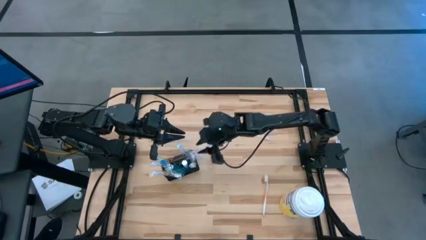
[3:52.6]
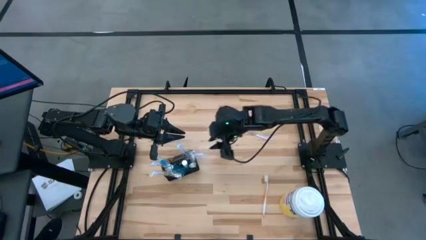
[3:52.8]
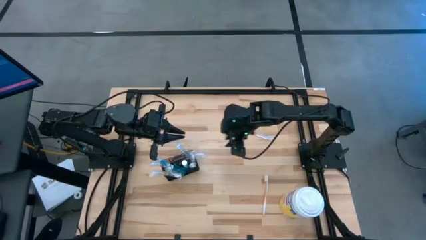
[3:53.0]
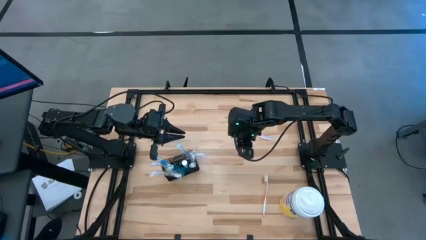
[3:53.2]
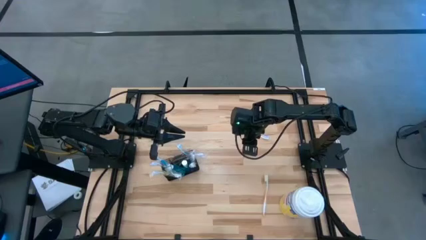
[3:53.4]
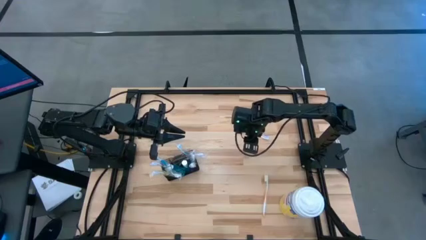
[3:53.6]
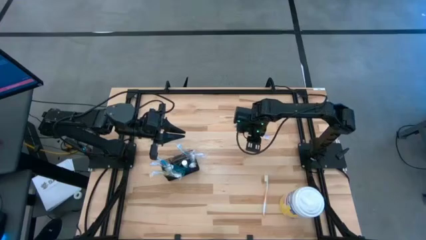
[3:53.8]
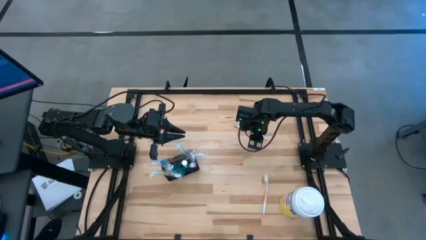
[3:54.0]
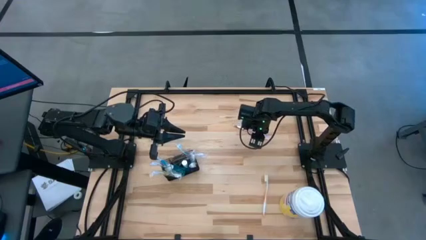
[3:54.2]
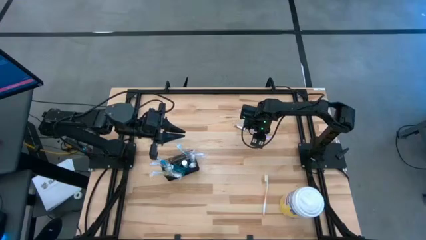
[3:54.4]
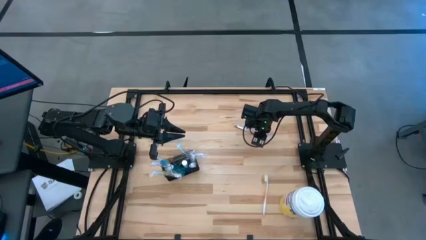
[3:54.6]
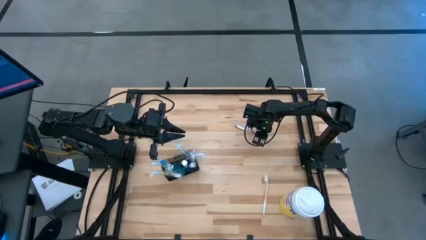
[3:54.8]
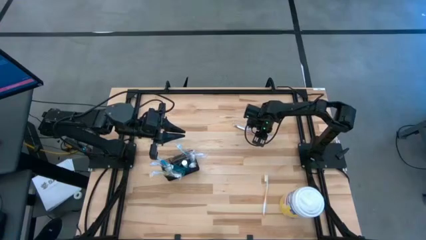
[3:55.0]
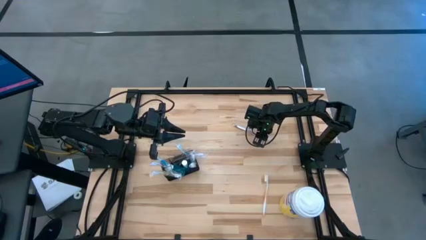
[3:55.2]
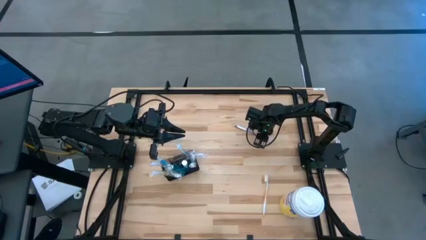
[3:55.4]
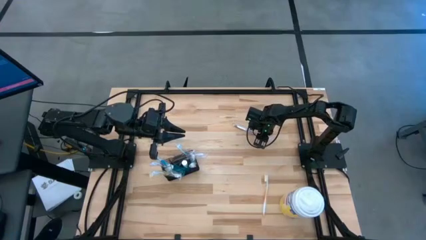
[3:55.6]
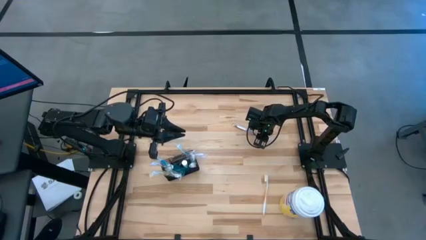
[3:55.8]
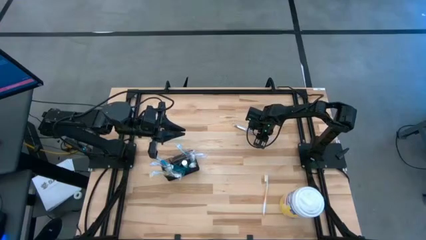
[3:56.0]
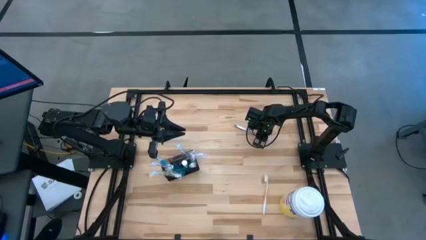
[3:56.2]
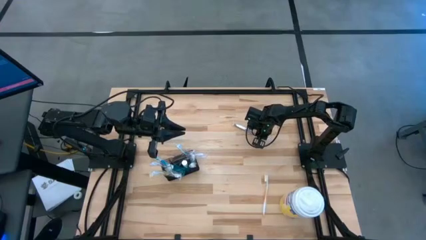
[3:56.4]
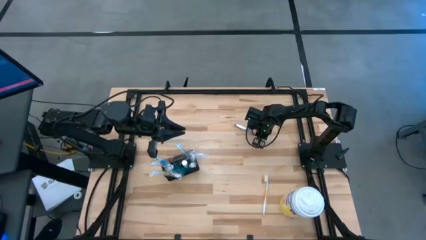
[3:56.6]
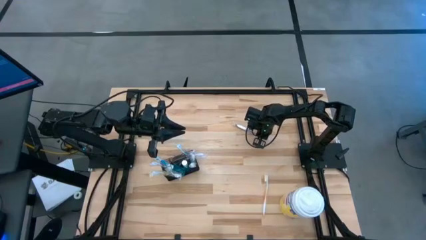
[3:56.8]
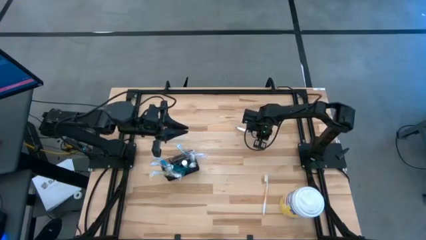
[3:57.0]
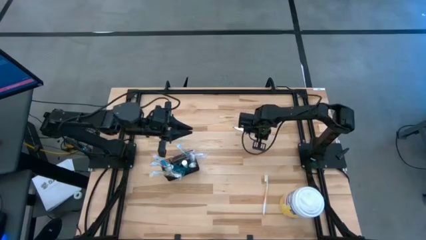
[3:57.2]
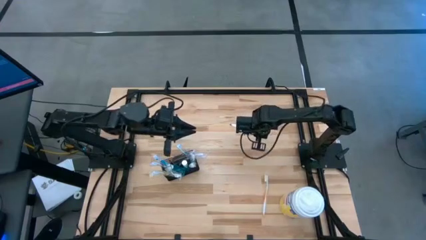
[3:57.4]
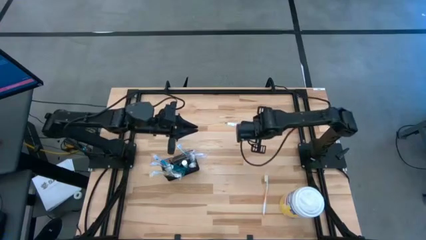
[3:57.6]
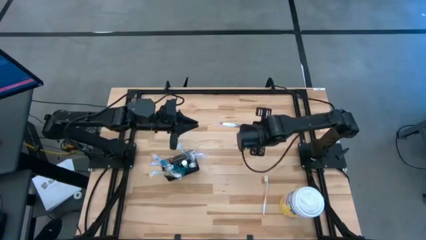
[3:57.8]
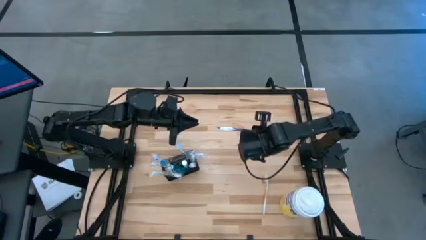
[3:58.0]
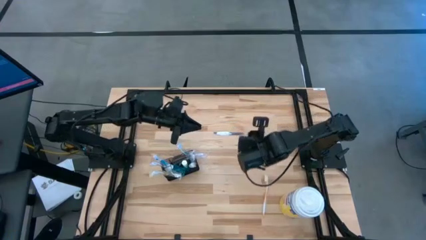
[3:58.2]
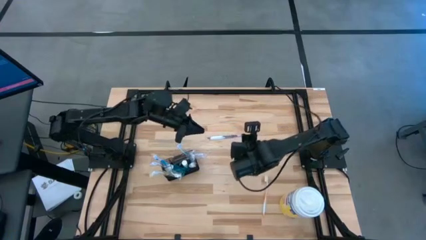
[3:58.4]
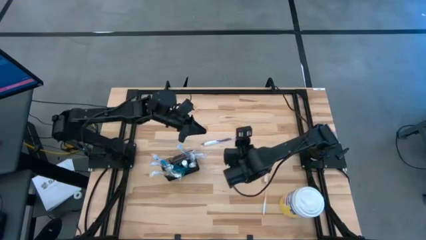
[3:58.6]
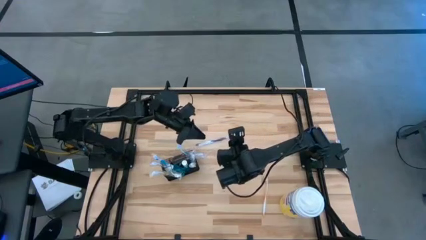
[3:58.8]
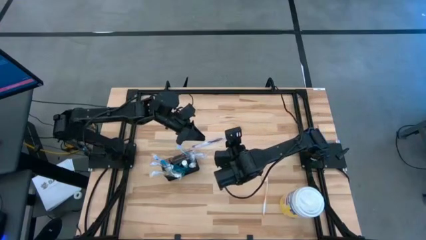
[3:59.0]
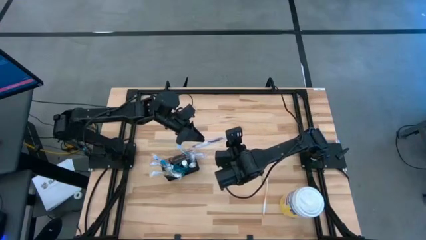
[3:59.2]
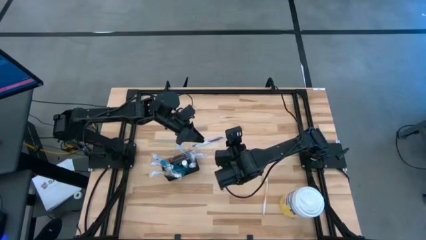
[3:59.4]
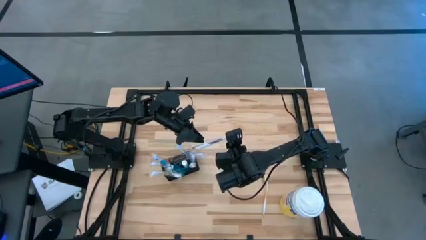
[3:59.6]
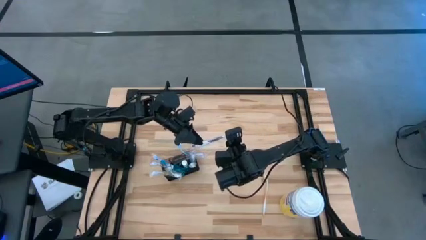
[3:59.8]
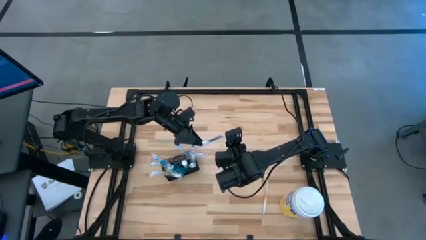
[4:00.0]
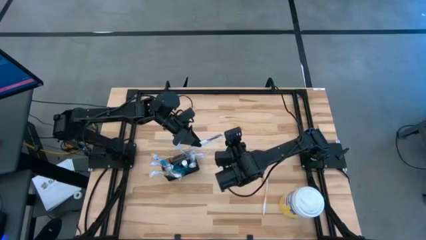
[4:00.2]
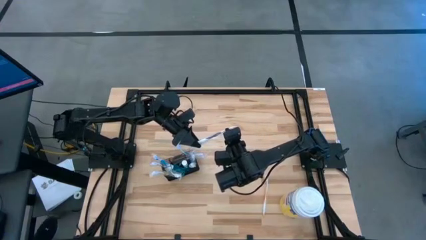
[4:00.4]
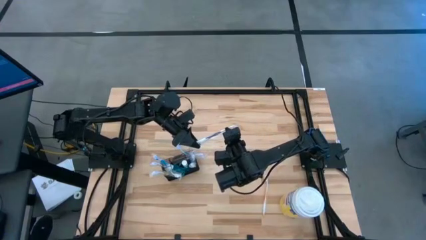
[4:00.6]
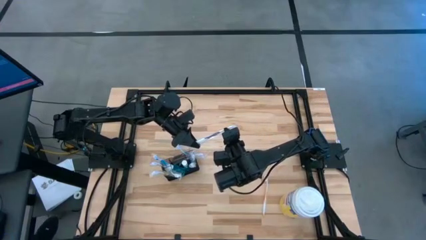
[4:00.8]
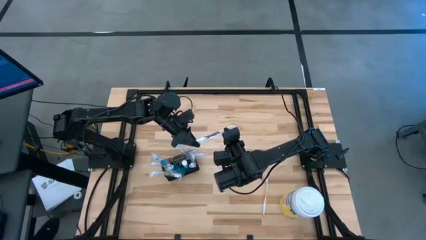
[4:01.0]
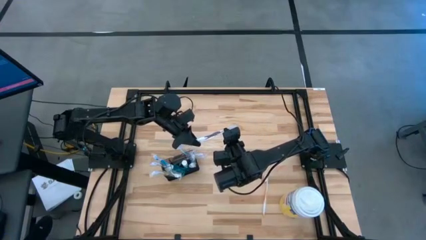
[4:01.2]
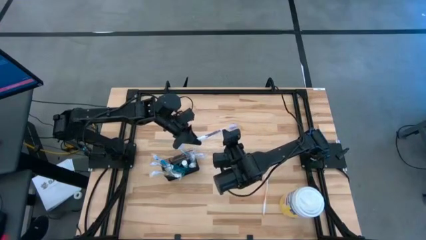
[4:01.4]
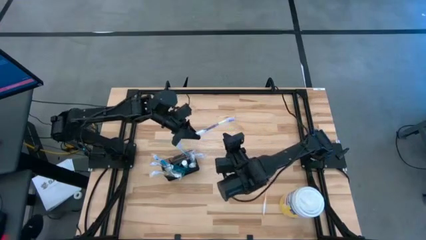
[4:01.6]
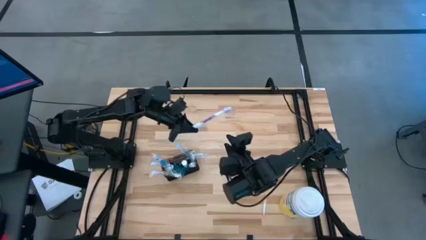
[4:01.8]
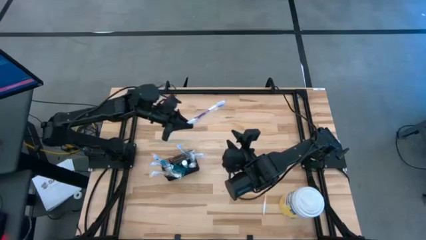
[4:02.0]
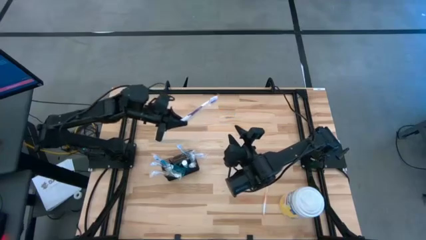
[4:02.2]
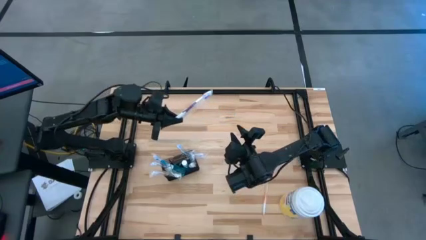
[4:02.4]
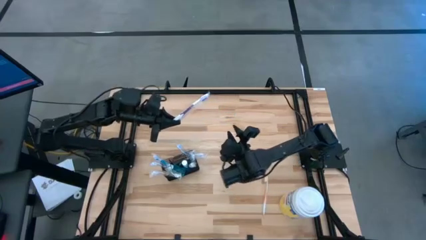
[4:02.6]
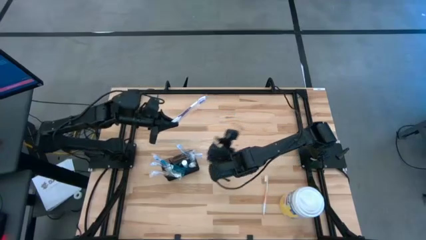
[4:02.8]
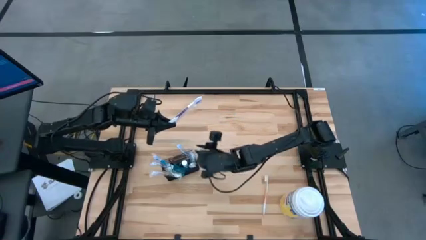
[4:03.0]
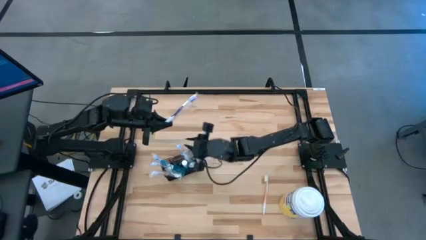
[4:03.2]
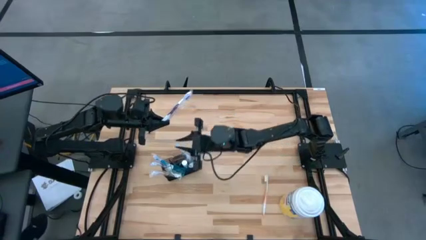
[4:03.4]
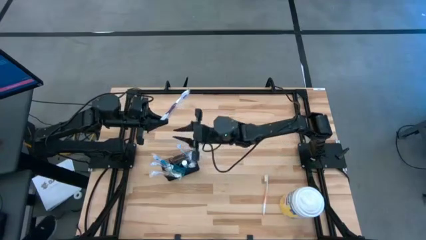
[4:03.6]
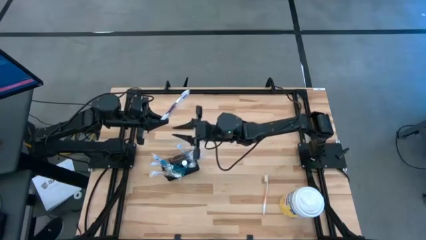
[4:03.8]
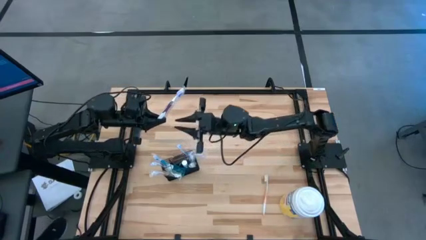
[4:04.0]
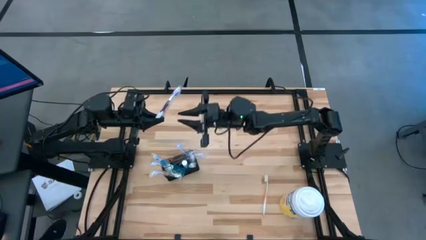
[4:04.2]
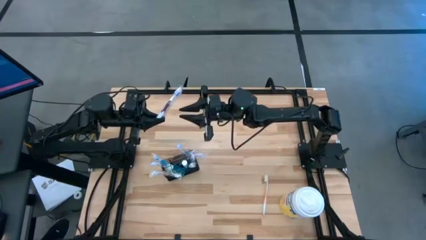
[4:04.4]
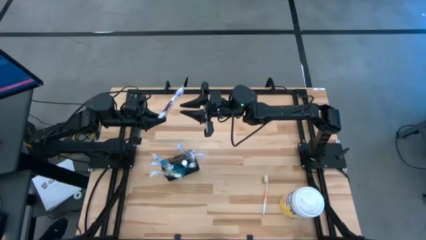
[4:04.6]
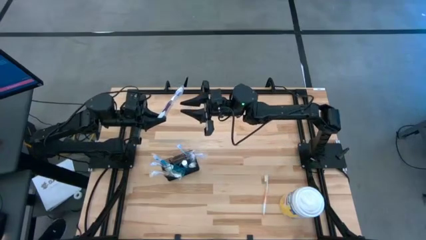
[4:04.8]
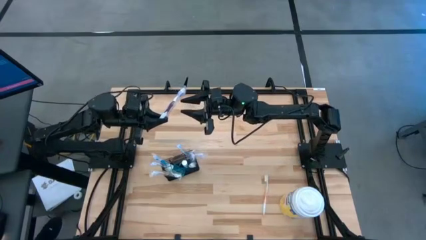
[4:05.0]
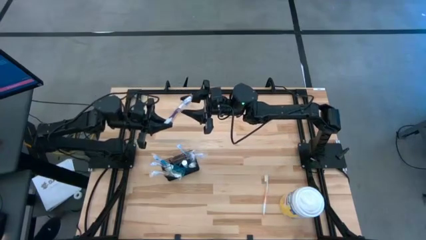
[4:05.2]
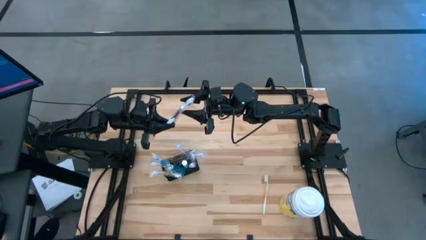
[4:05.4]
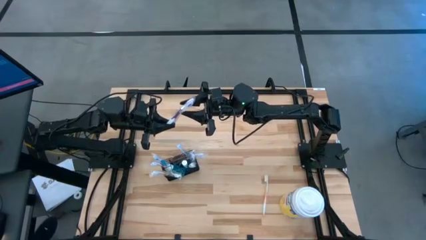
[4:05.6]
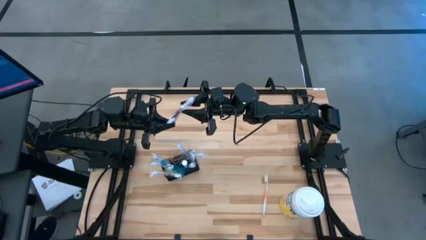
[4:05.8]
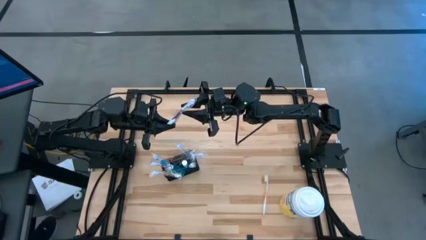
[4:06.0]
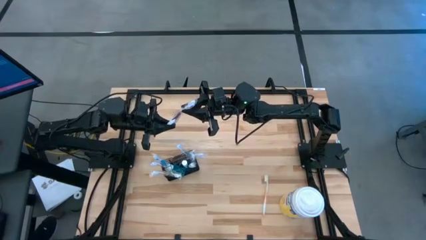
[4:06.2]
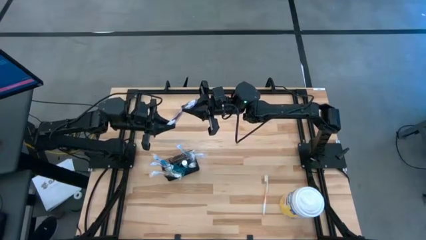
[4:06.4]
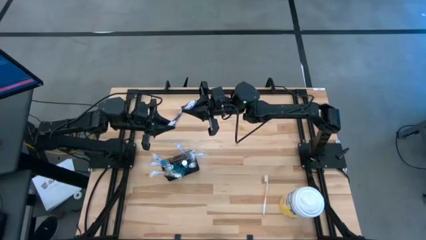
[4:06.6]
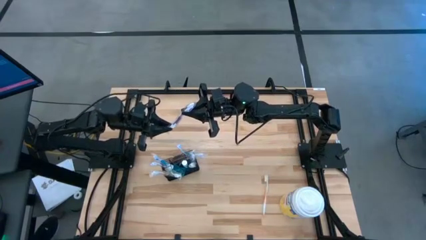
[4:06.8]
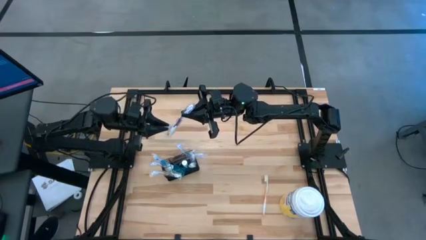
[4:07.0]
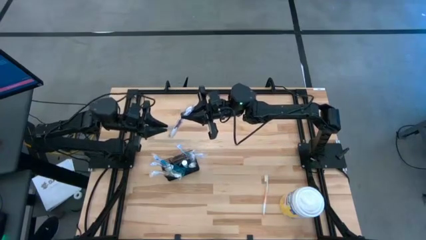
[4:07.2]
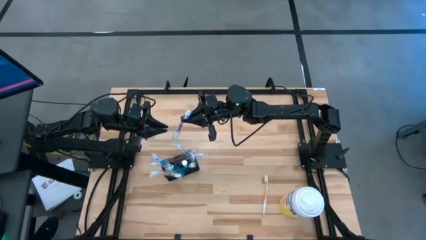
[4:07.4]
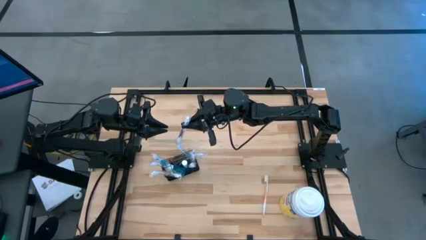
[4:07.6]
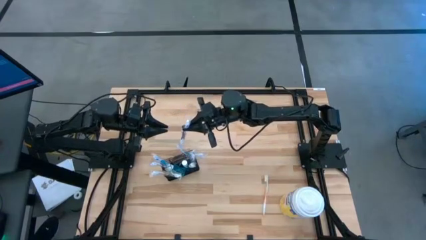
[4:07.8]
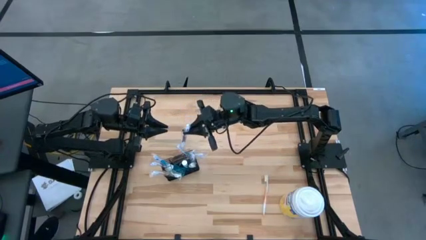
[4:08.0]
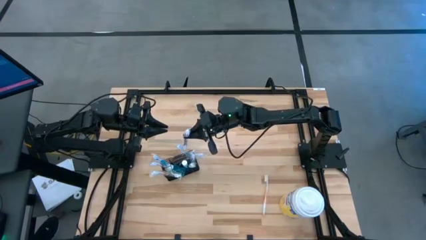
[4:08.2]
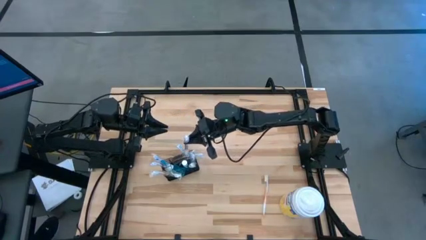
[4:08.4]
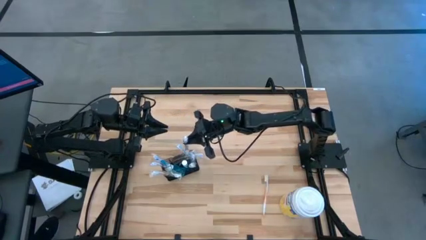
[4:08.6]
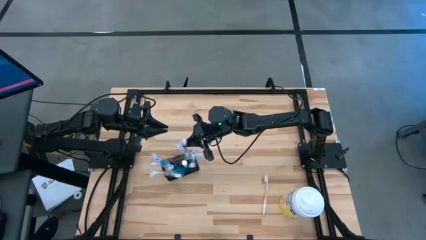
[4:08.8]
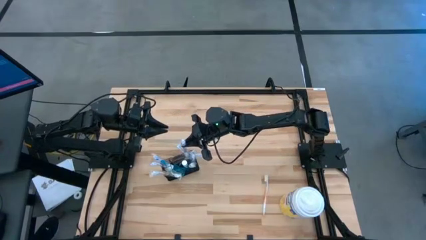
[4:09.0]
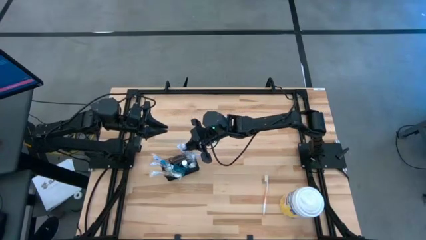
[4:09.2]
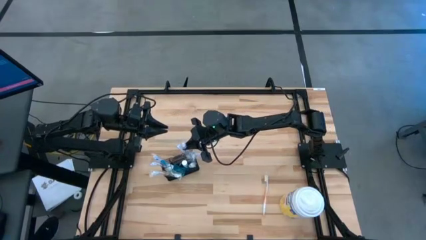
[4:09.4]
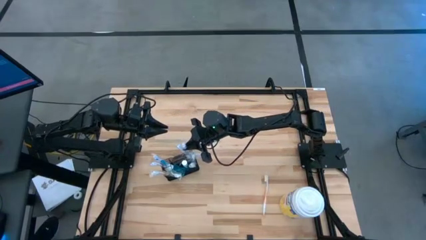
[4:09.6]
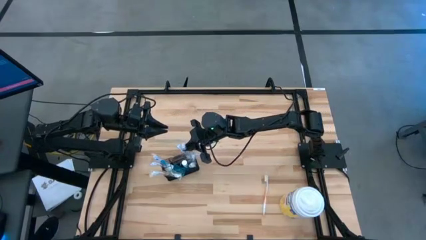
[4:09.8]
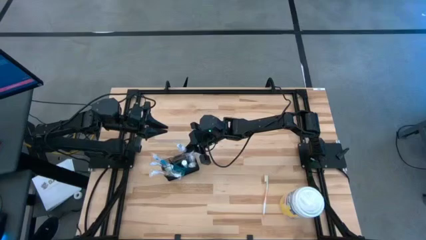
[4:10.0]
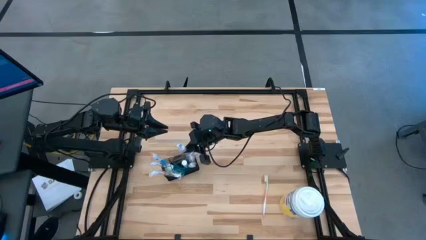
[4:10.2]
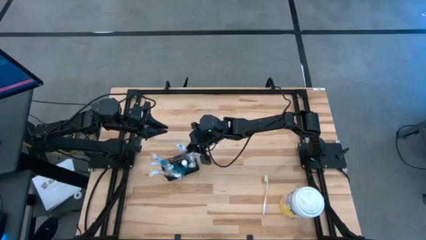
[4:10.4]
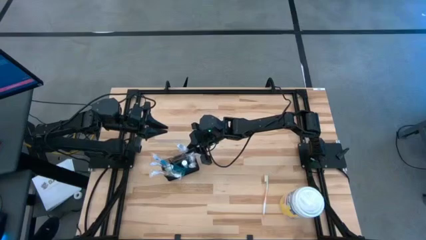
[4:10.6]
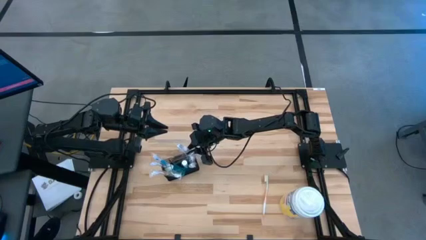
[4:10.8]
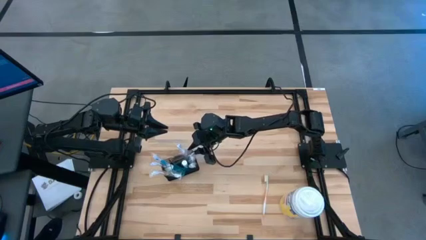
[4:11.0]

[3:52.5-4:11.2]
Task: Pick & Place toothbrushing station
Put the purple toothbrush into the top right section of the mesh organizer
